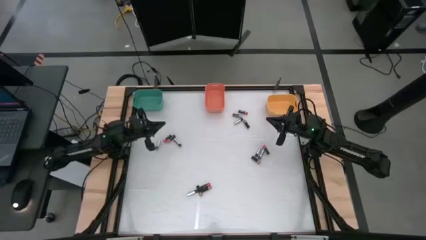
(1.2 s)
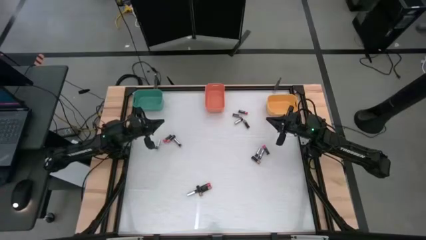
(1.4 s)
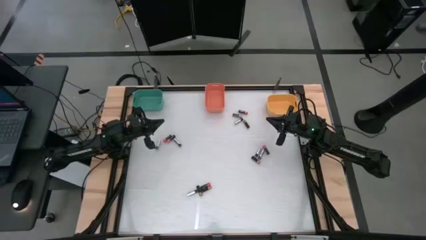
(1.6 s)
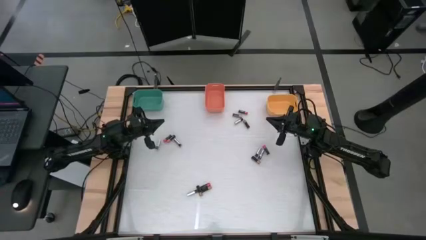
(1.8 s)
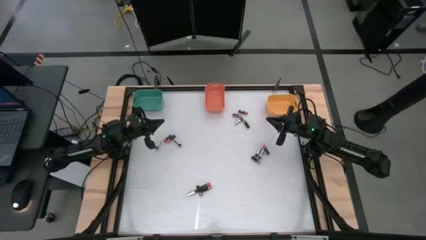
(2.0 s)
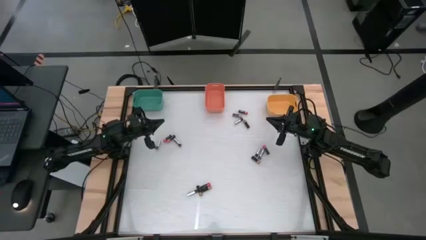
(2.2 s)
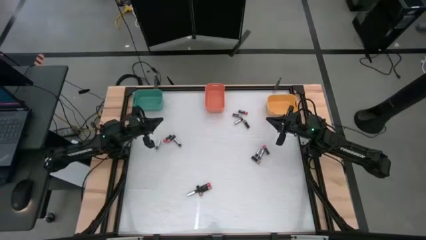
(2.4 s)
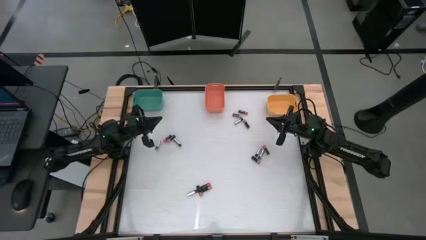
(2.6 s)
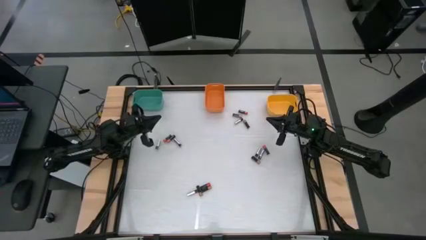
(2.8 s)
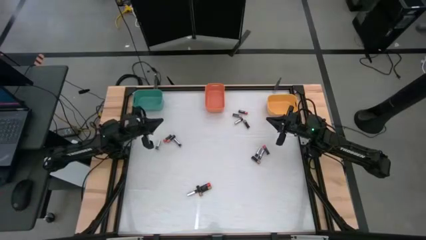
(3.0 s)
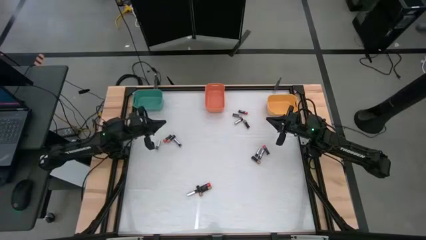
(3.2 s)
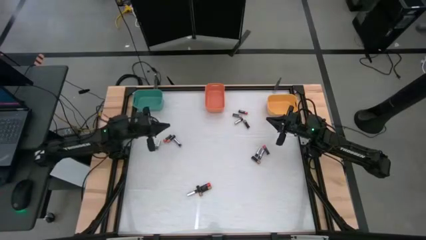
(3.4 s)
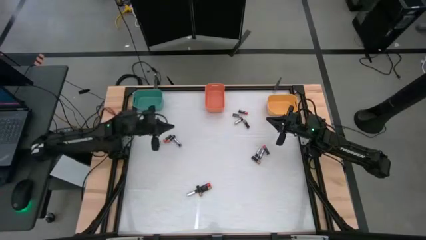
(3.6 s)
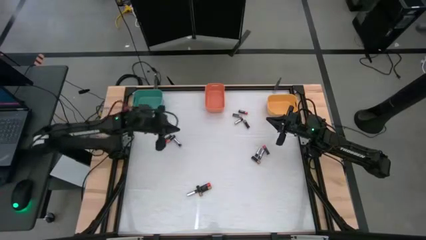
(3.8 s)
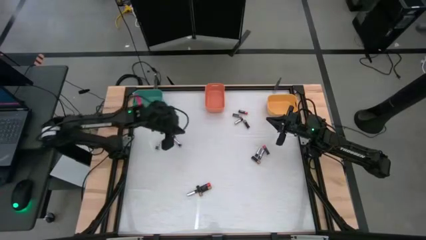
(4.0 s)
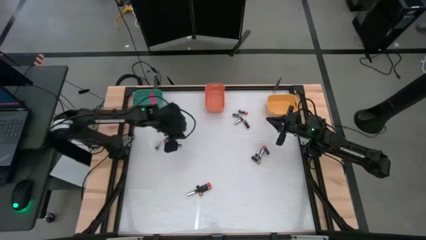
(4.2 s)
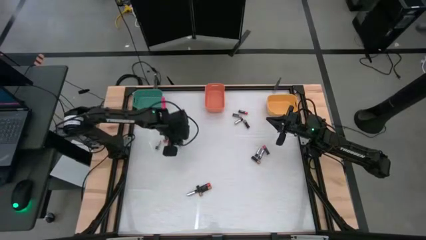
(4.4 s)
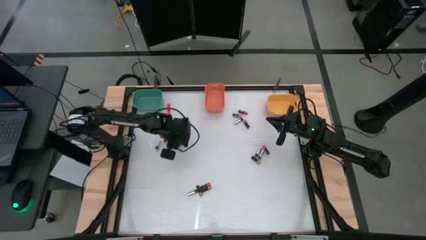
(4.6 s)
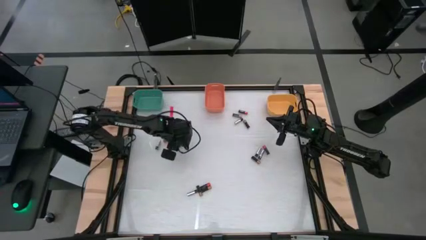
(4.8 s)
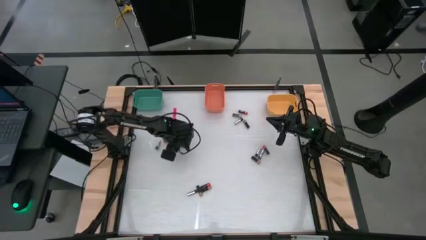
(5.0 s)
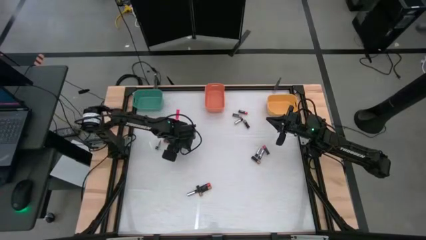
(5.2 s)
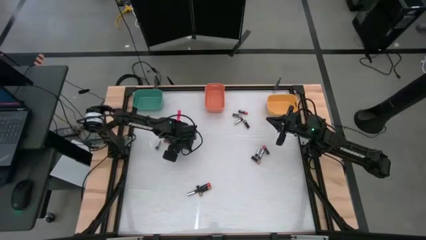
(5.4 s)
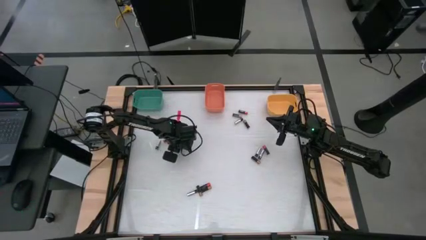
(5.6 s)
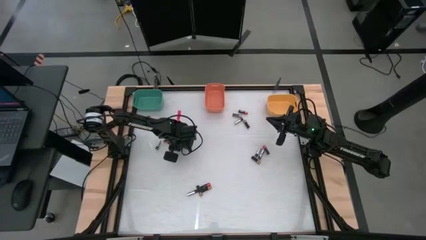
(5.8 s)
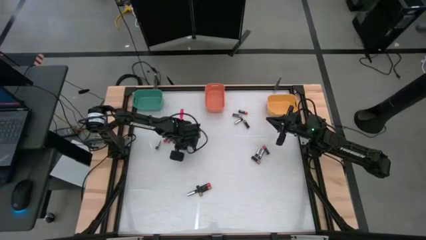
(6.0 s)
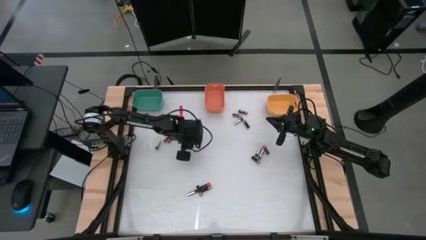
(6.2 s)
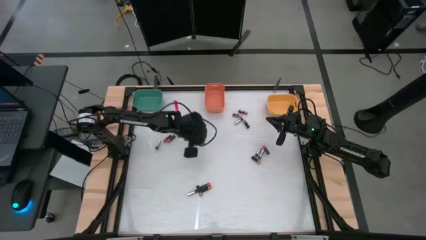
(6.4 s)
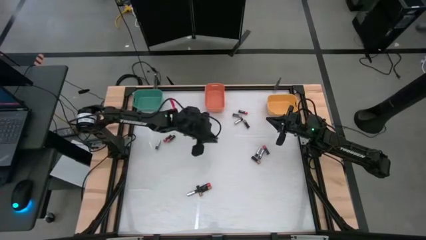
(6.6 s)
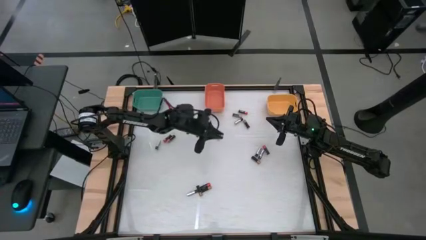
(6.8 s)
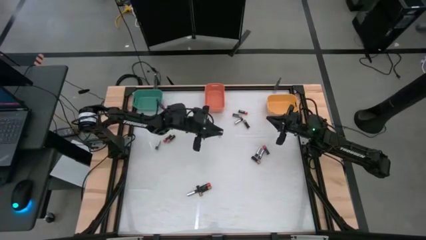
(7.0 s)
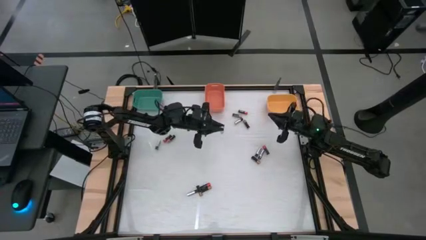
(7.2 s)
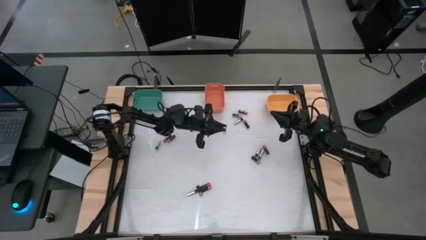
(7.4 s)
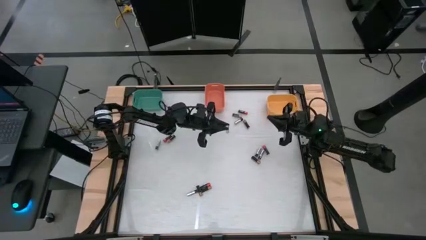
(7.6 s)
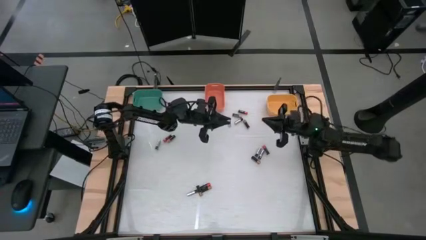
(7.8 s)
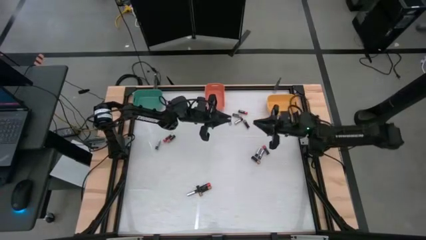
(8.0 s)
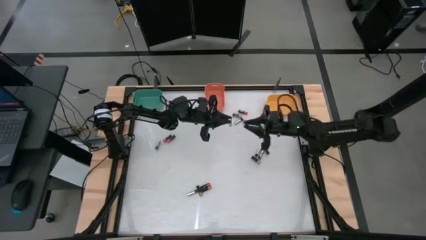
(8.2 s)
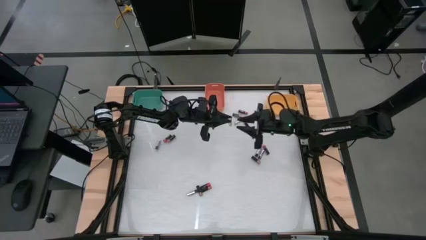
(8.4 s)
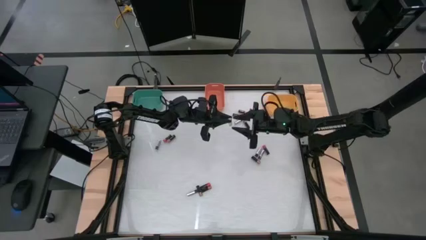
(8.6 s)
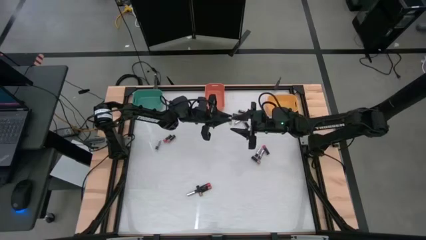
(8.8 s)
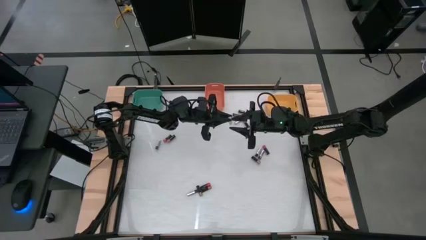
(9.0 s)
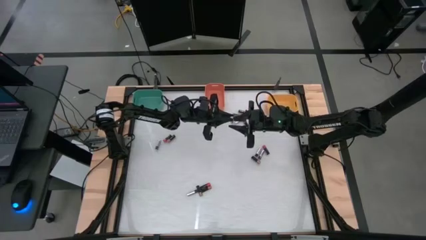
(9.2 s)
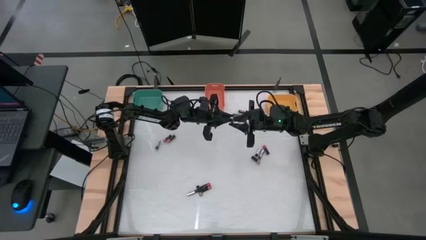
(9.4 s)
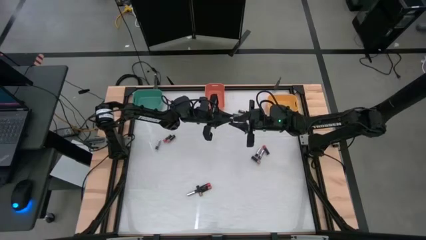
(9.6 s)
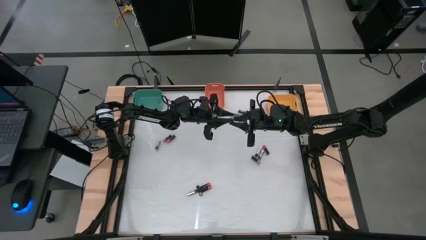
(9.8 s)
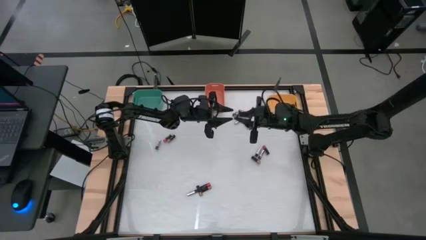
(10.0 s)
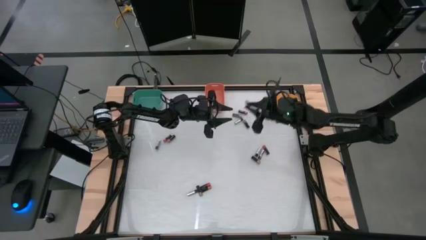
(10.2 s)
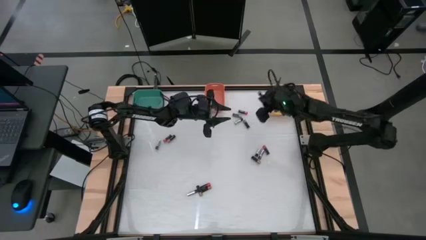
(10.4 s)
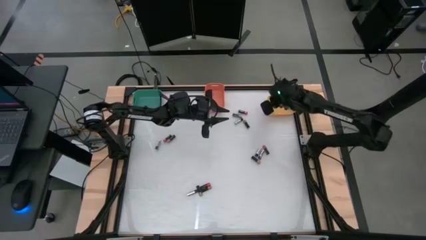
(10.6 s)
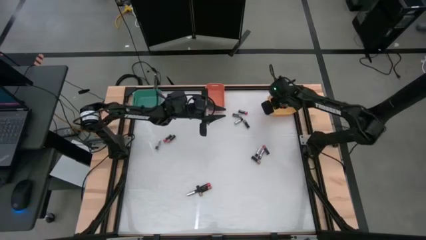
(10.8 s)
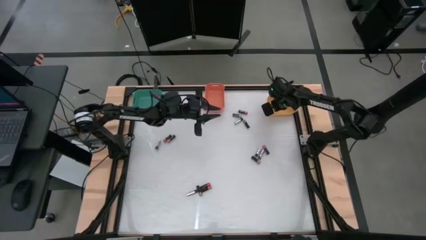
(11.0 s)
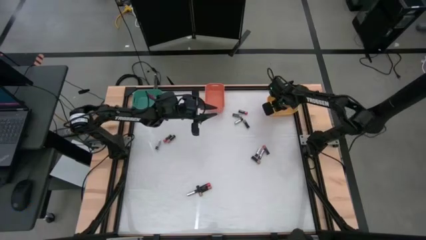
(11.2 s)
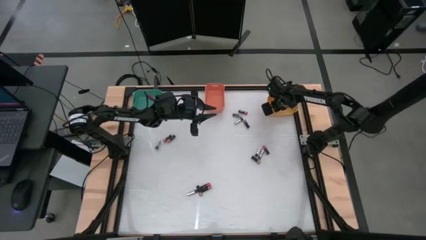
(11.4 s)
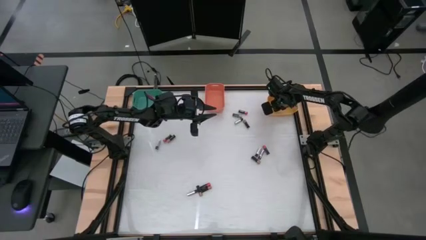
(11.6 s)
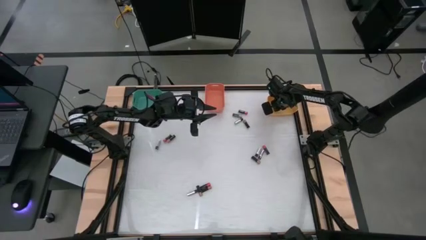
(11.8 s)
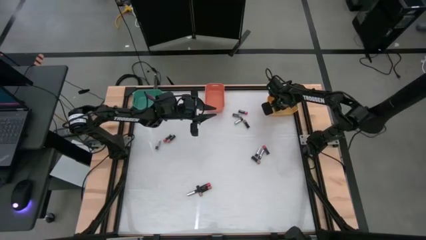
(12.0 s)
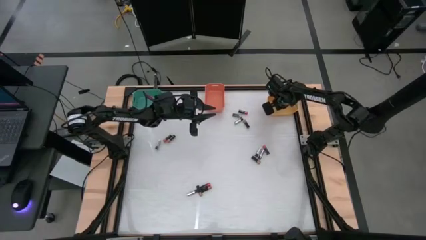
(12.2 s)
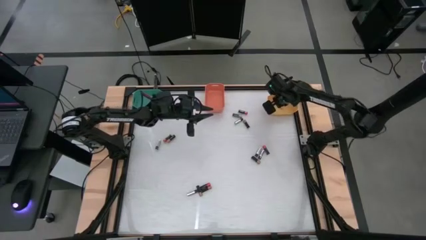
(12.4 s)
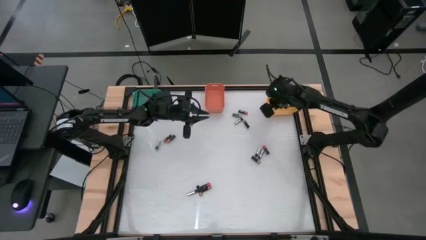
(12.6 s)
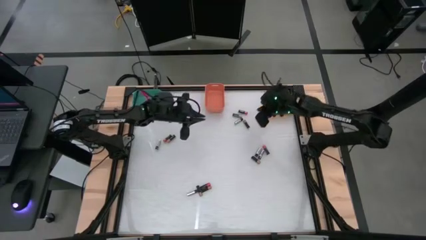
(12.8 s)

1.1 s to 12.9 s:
Task: Sort batteries
Put the top left silver battery into the yellow container

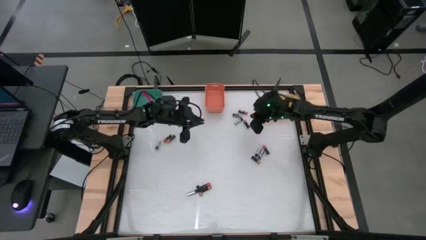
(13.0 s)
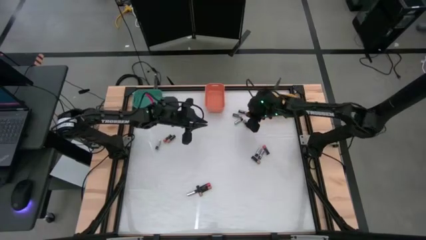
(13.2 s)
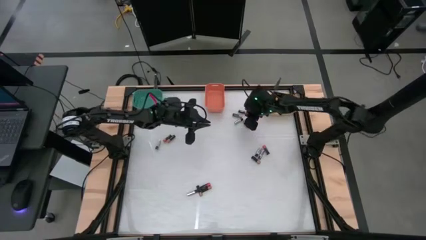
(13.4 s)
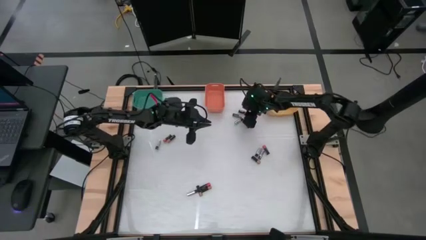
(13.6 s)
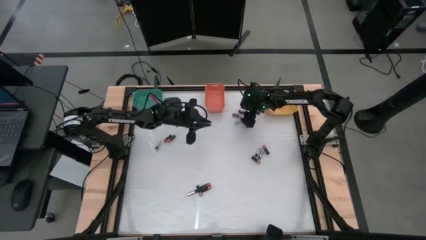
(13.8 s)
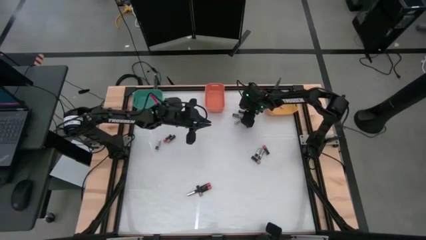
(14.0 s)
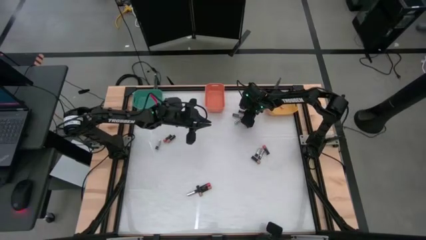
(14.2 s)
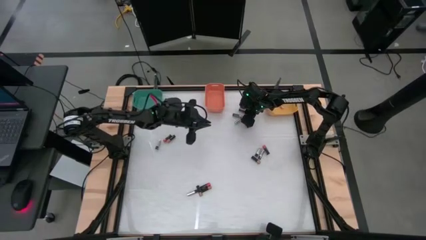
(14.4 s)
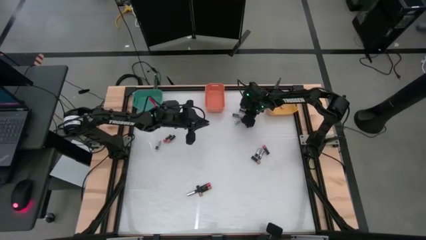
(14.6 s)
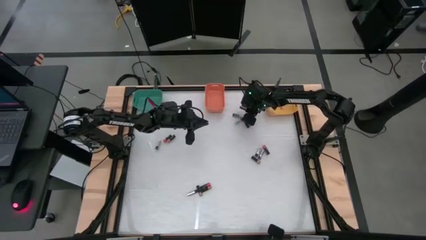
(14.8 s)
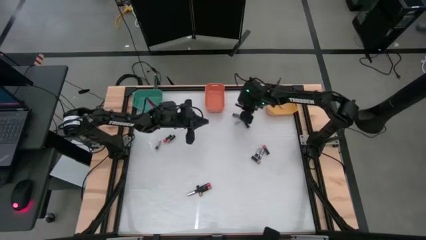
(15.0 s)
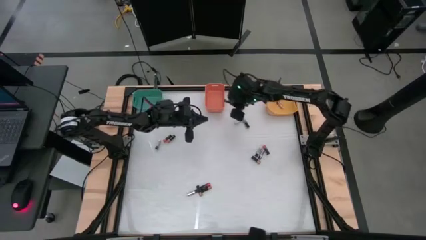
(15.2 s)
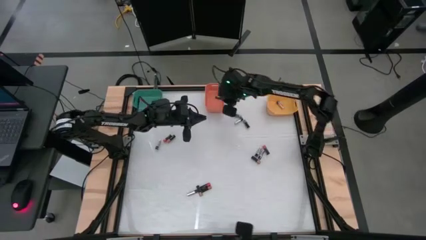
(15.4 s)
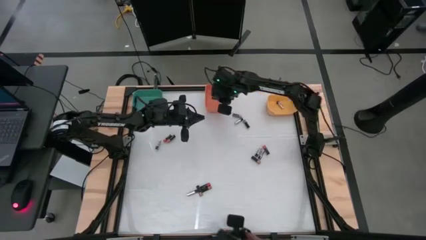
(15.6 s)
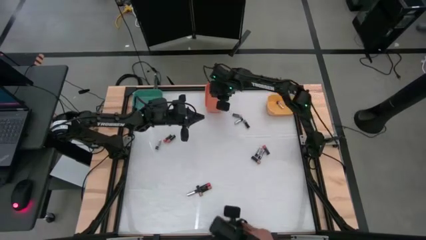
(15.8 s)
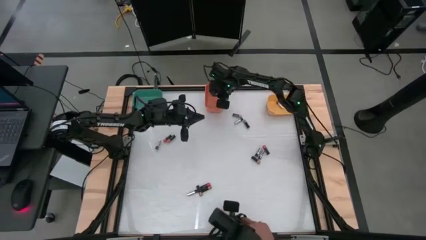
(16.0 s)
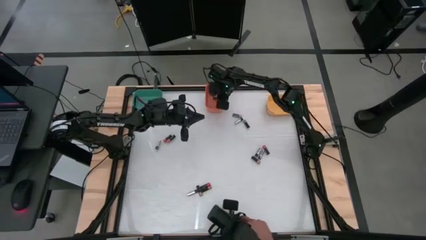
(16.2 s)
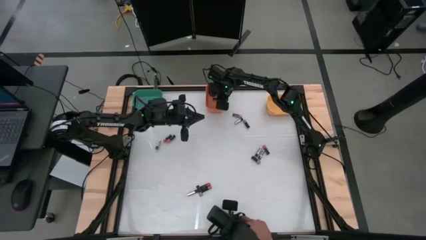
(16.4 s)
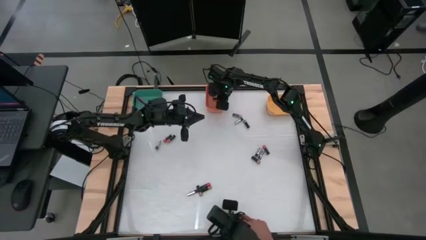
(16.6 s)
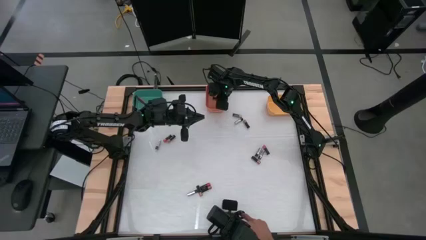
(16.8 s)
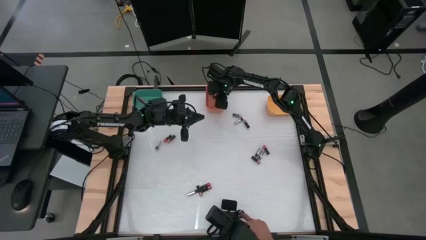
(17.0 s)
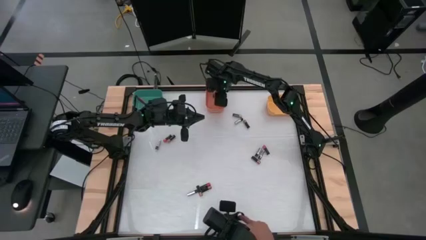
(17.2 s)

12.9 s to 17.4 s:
Put the top right red battery into the orange container
